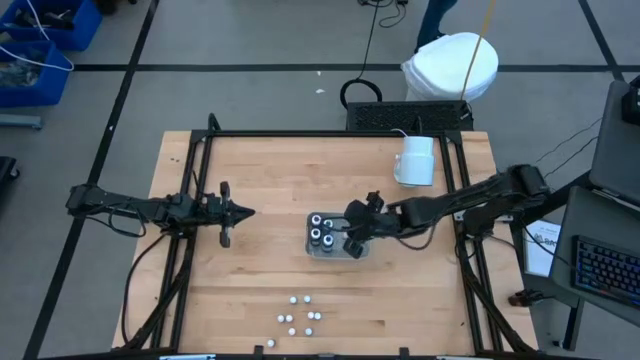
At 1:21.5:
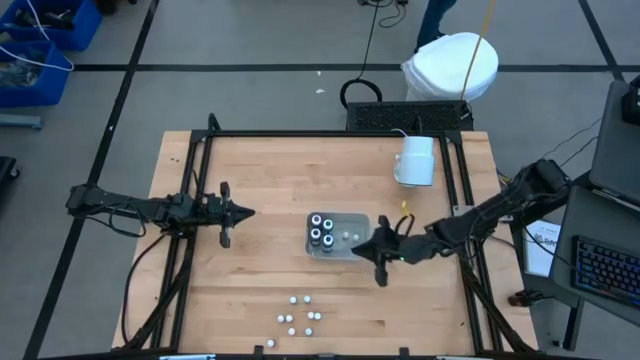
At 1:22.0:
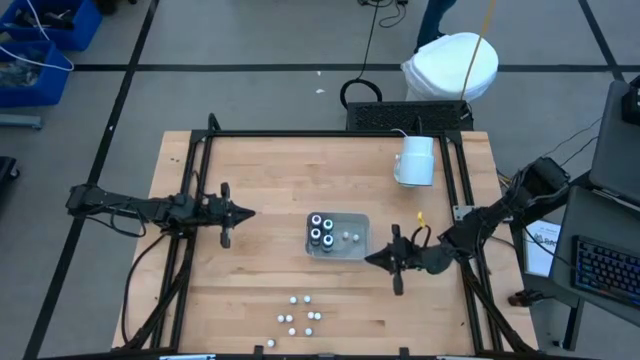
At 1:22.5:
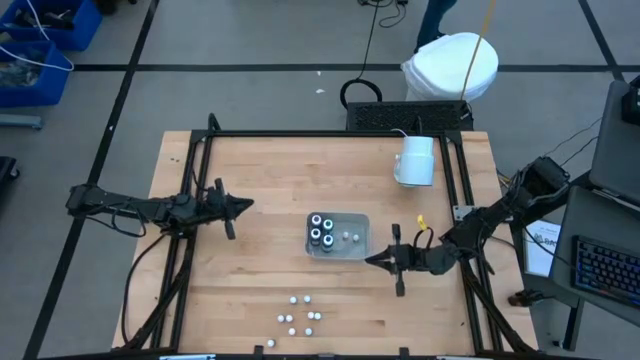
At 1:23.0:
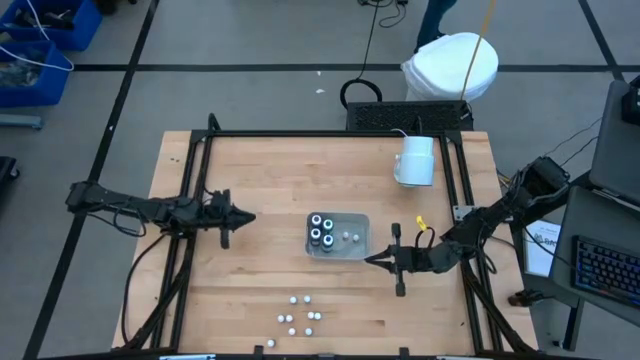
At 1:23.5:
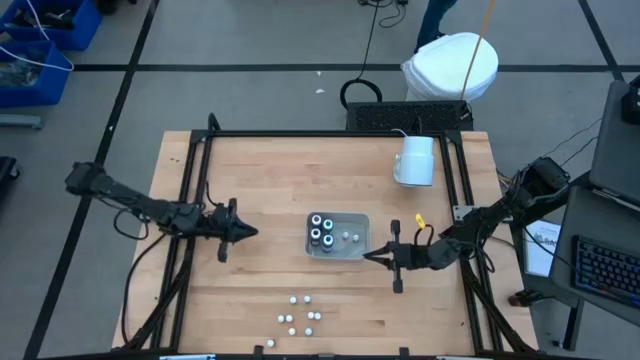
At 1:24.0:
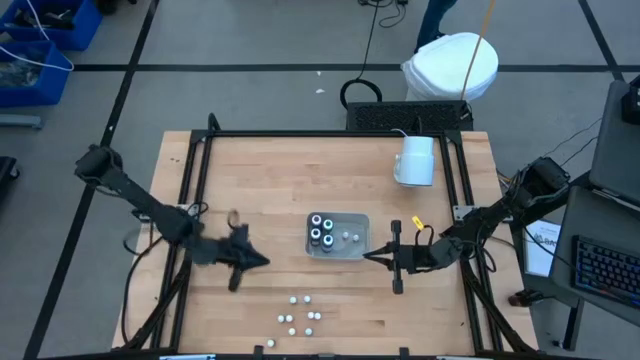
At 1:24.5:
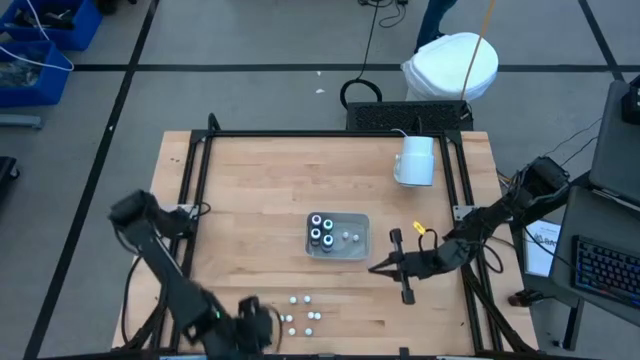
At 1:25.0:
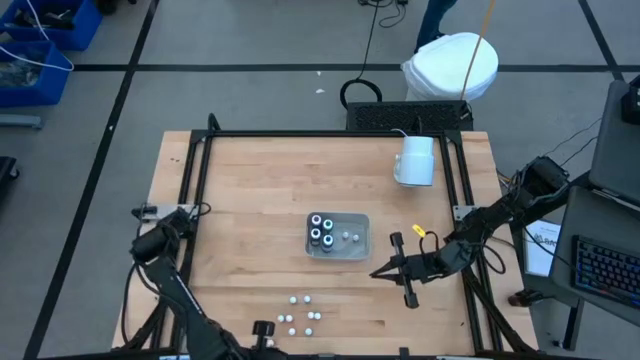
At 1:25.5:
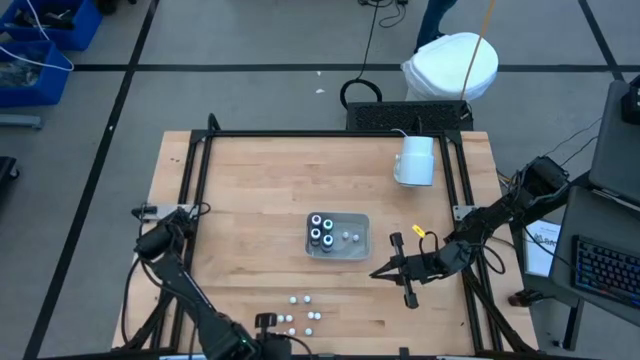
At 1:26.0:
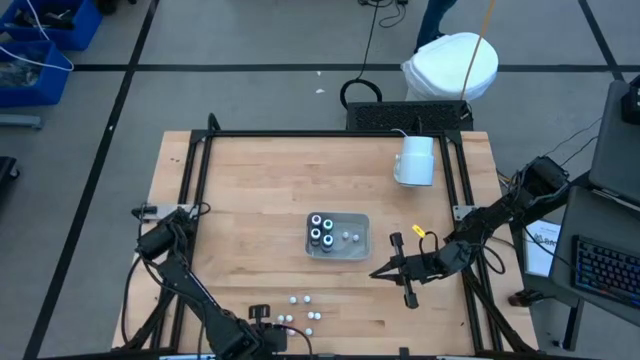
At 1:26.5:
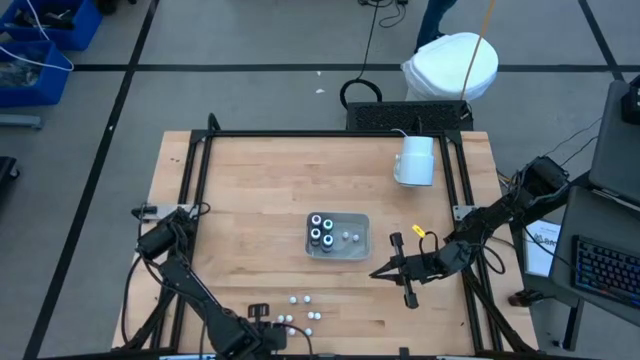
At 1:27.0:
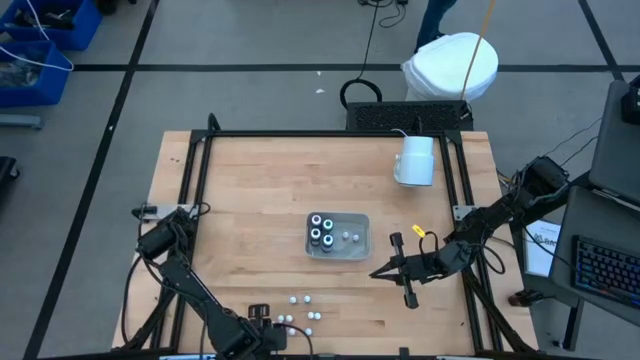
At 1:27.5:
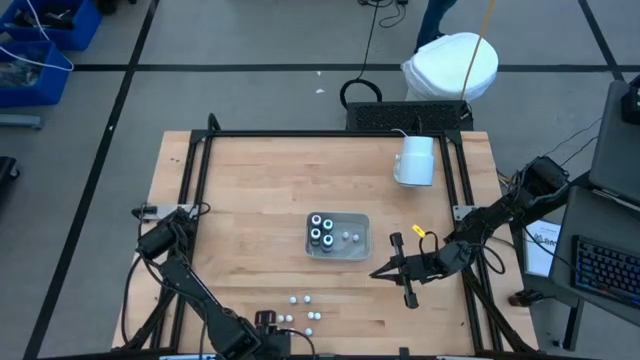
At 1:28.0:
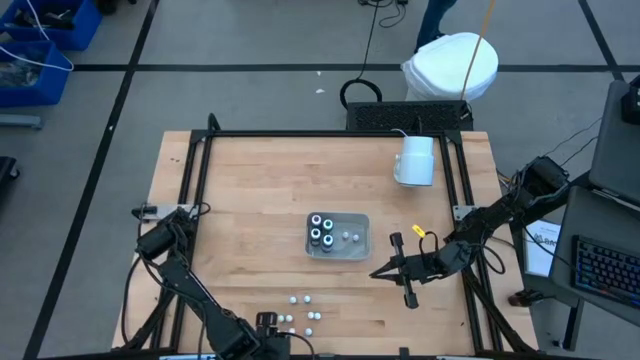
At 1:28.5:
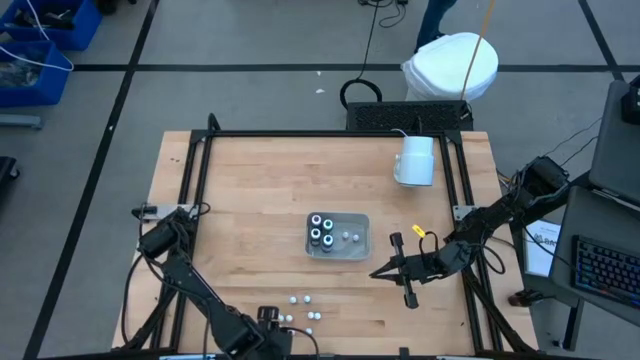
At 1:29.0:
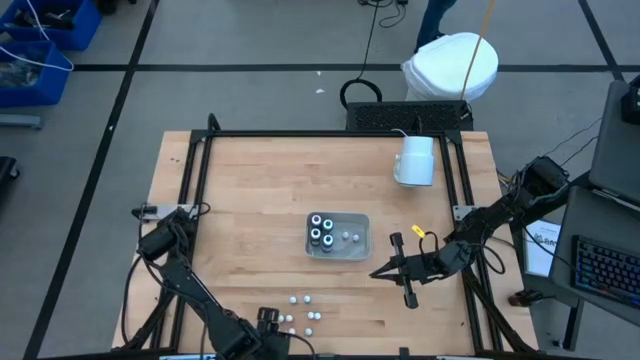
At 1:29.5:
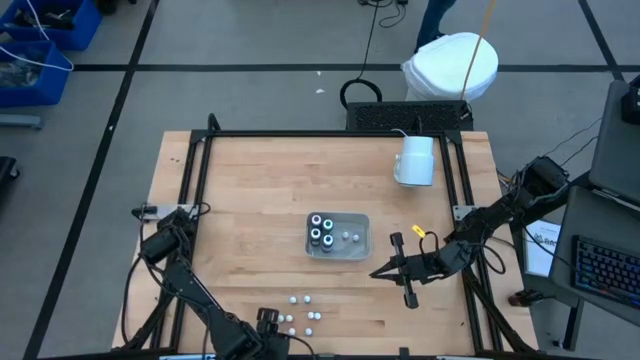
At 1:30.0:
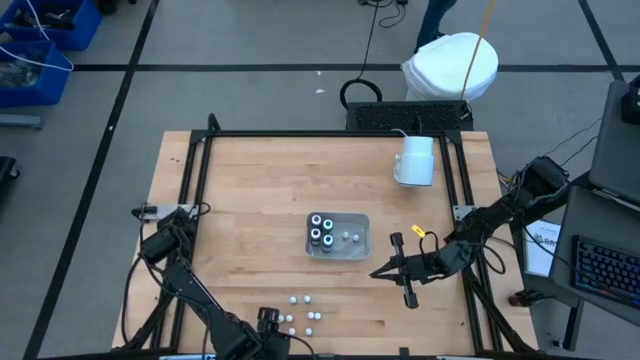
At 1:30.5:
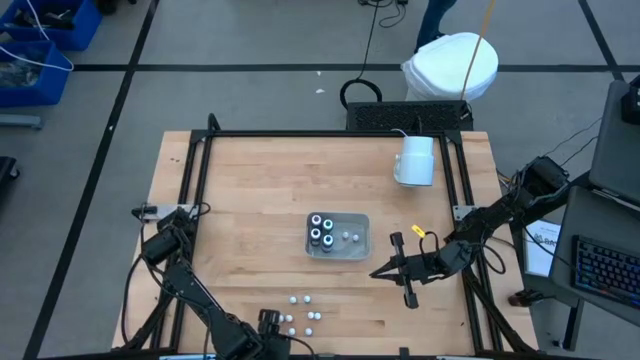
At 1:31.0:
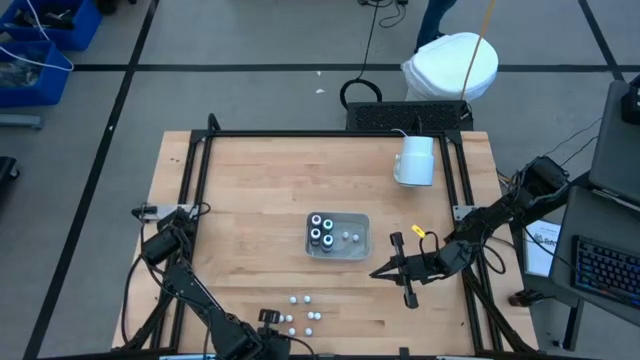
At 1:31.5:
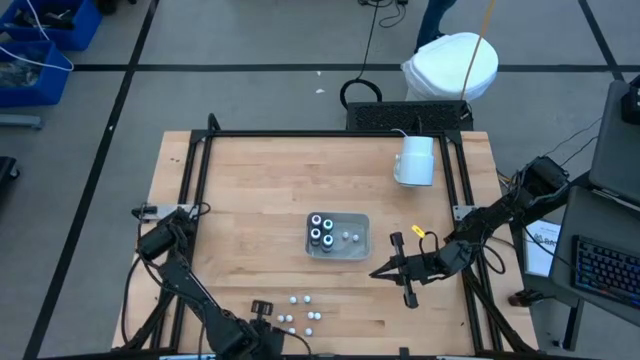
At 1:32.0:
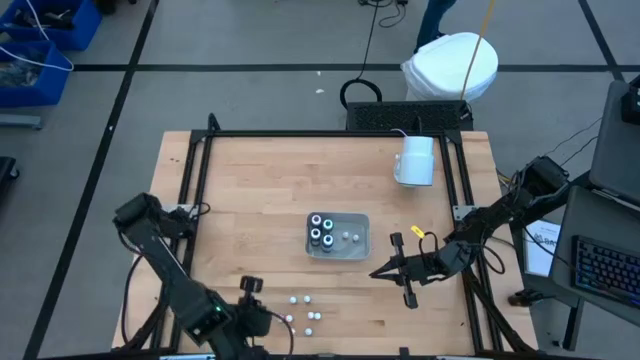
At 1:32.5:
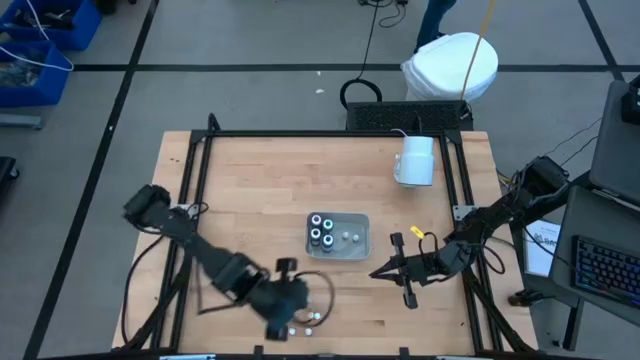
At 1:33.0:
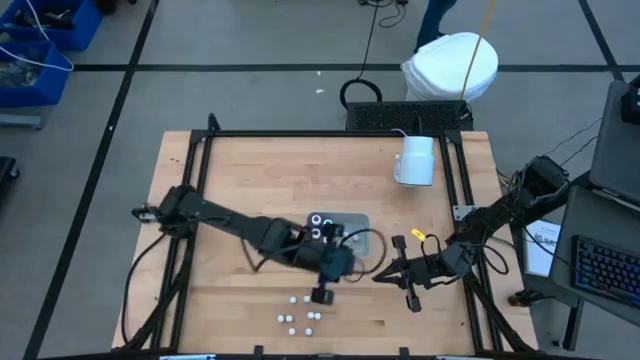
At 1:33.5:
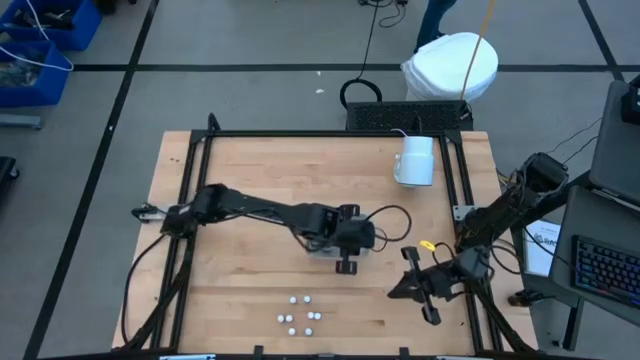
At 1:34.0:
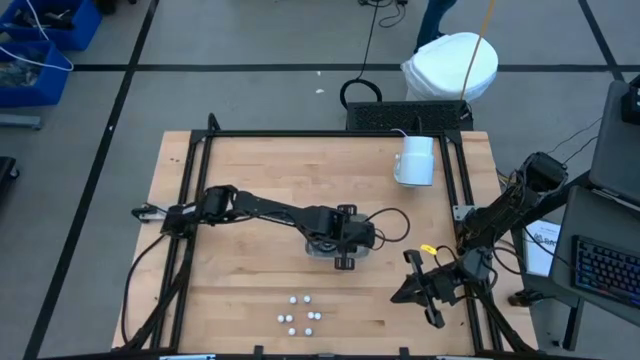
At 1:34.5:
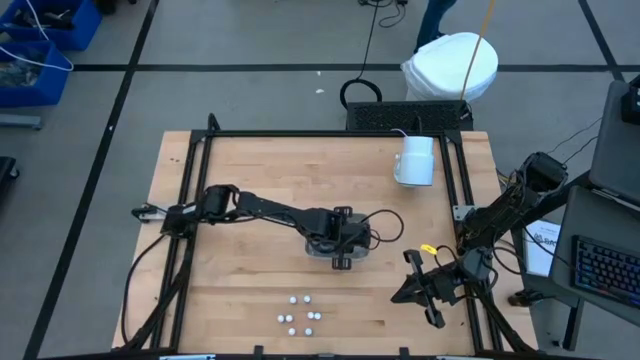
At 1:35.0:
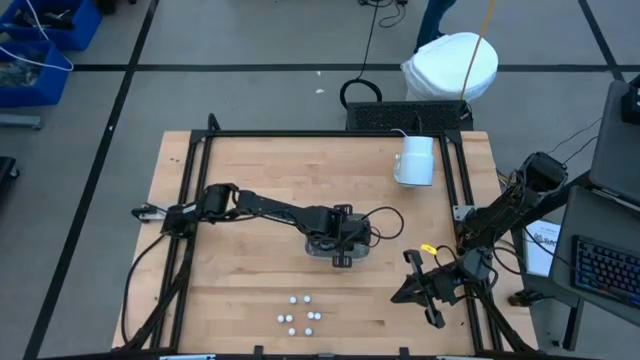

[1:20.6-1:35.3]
Task: Pick & Place food coloring
Put the small red food coloring into the gray bin

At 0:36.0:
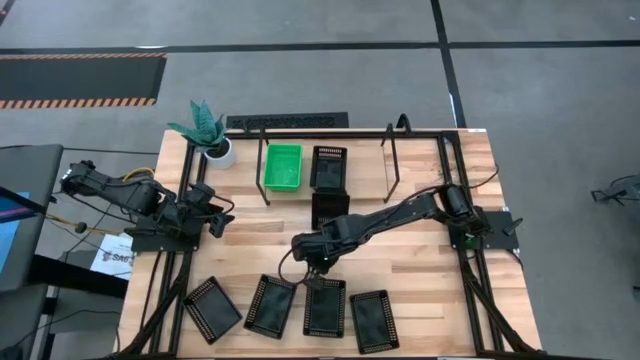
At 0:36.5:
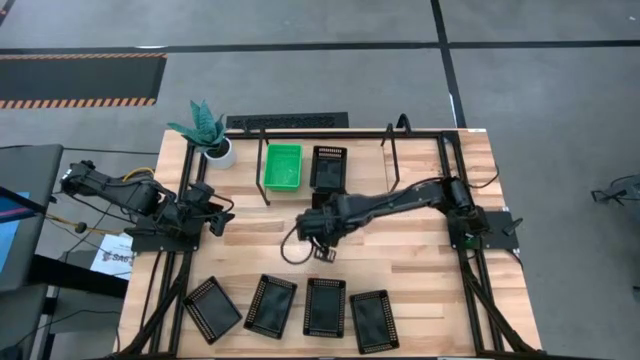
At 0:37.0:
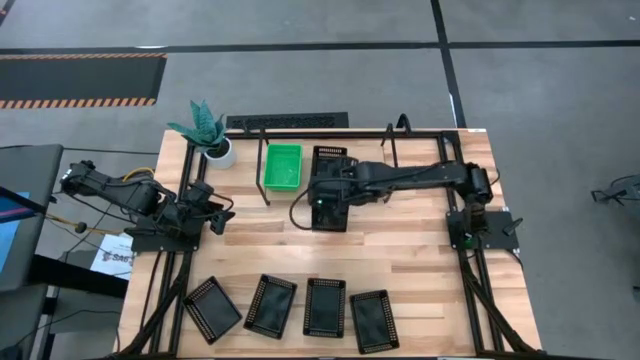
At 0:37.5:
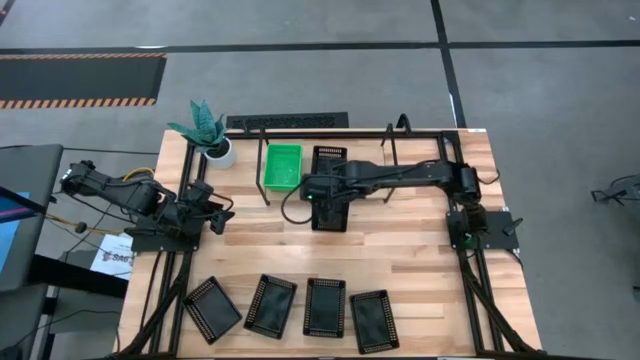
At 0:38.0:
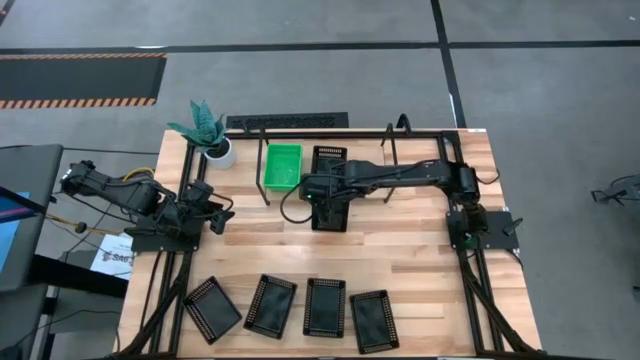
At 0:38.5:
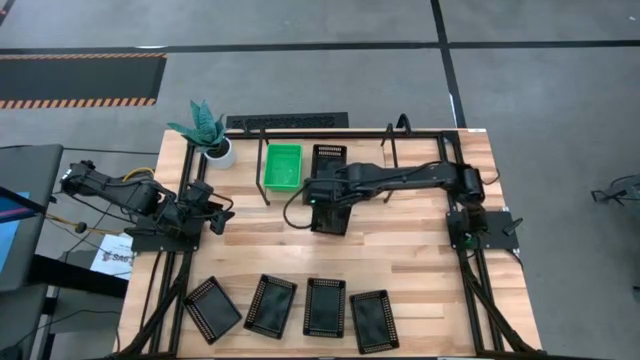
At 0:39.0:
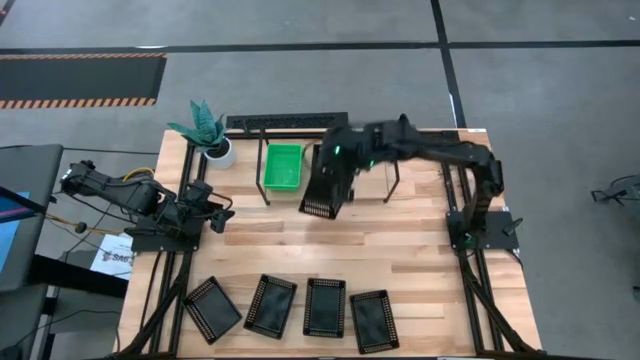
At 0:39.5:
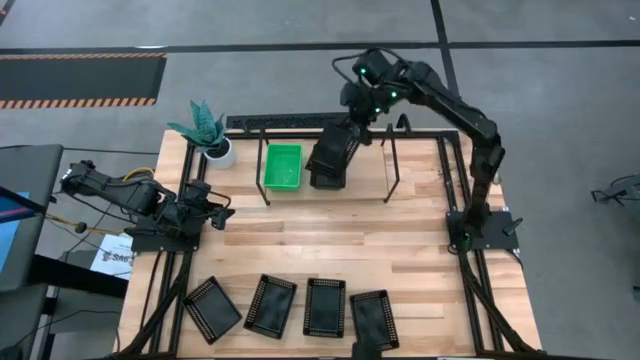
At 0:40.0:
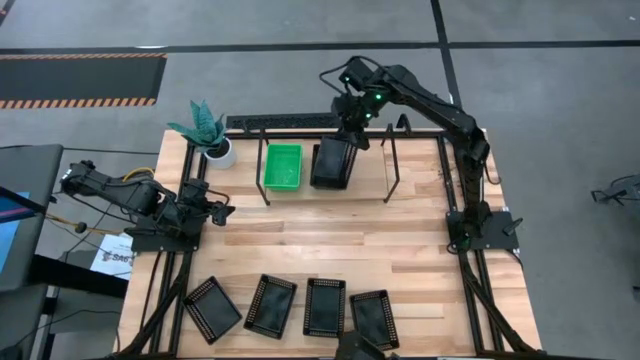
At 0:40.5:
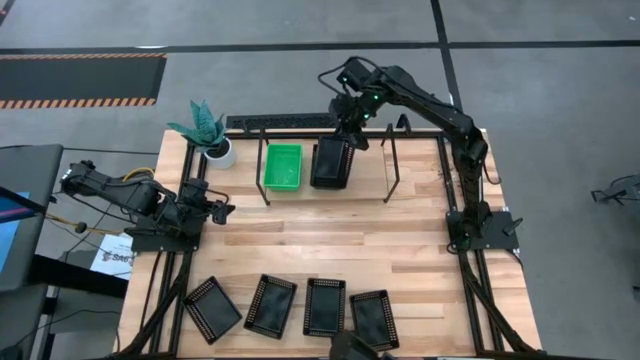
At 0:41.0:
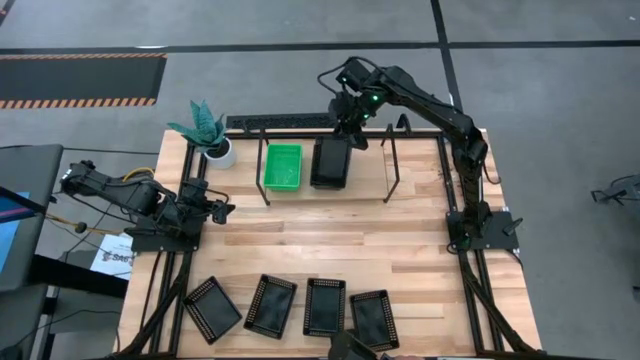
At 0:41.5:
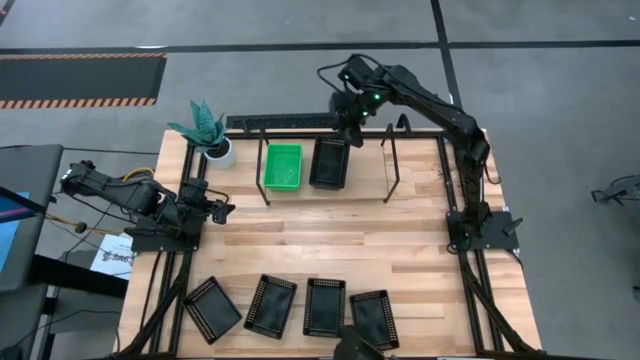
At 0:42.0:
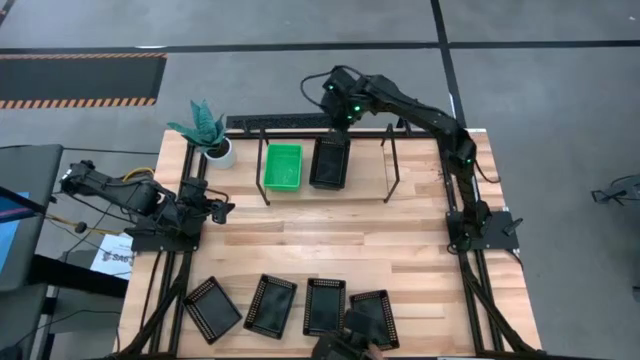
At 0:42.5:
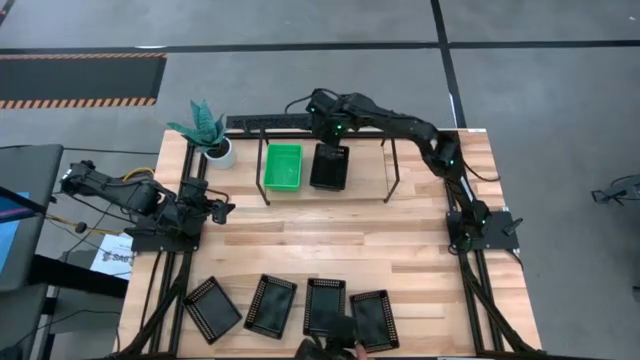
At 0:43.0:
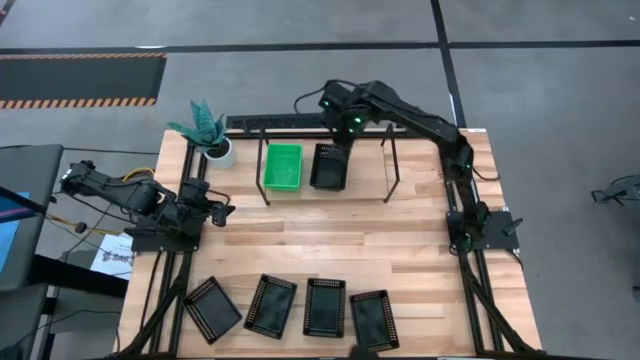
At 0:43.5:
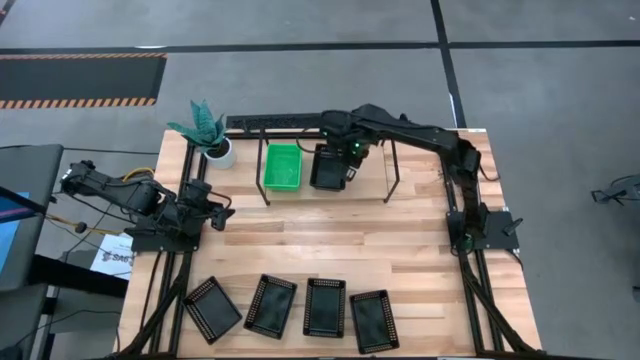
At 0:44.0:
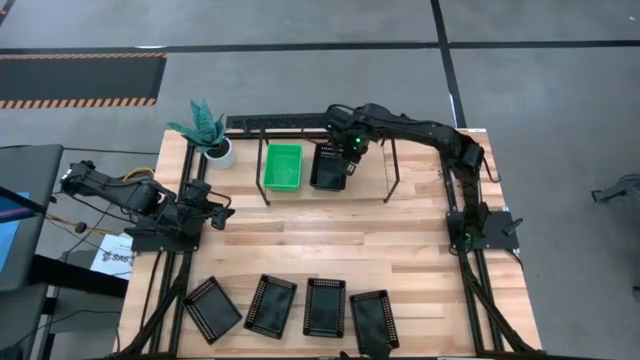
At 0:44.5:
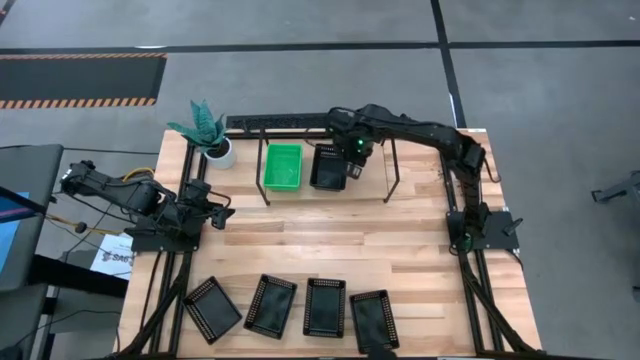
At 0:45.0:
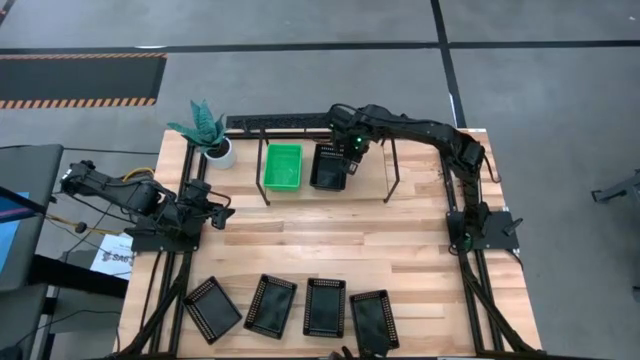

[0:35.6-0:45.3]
Task: Stack baskets on shelf by color
Stack the black bin into the black bin on the shelf
